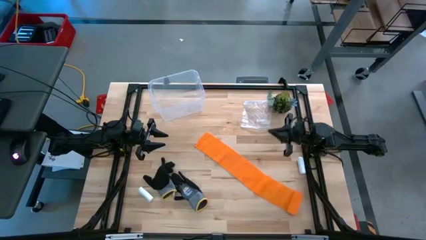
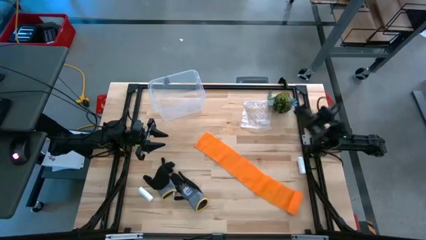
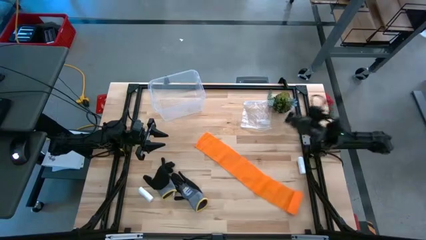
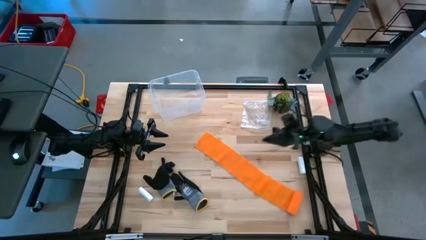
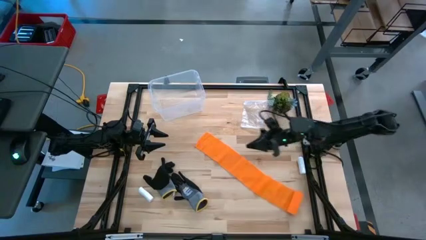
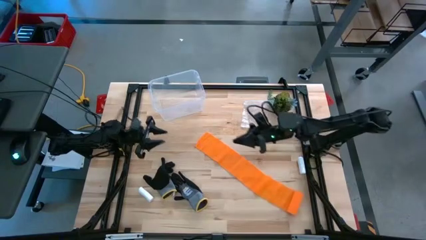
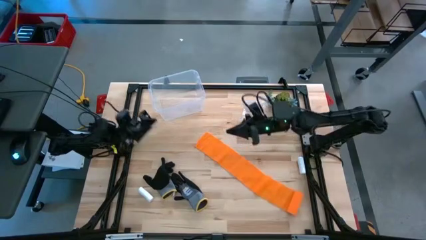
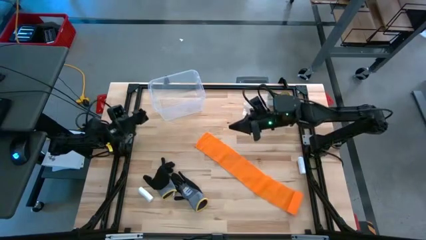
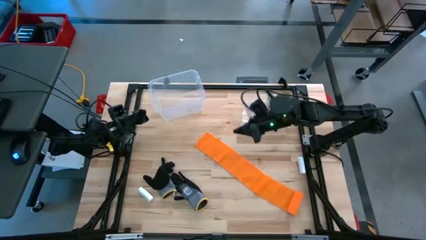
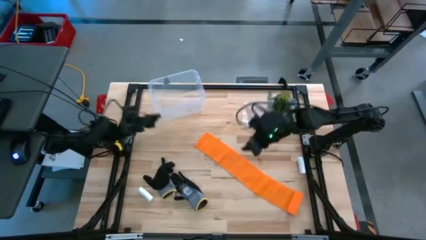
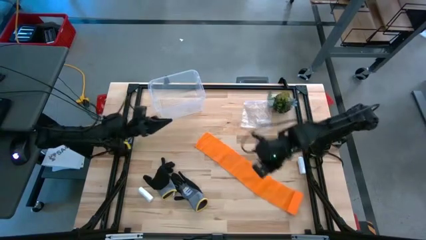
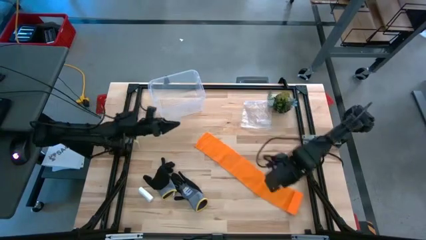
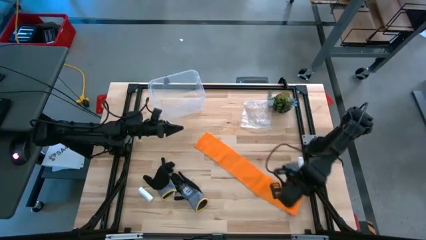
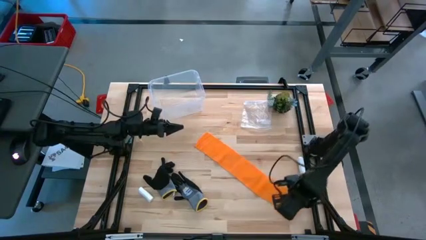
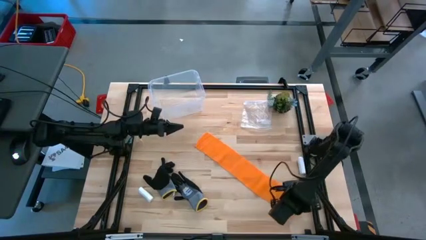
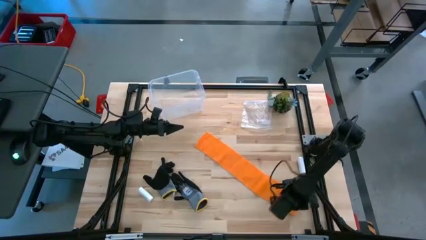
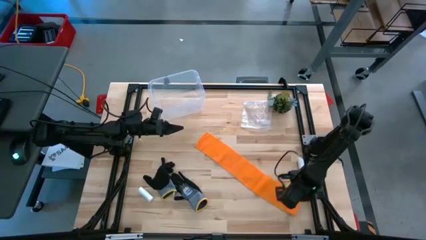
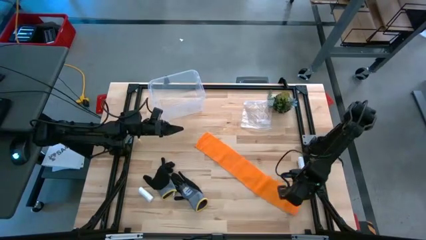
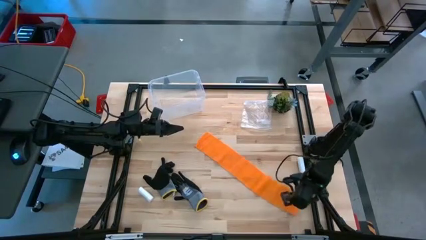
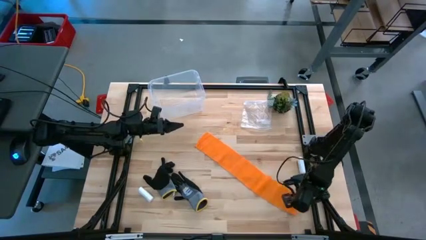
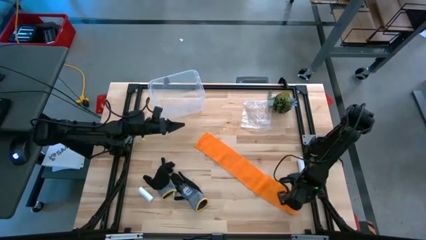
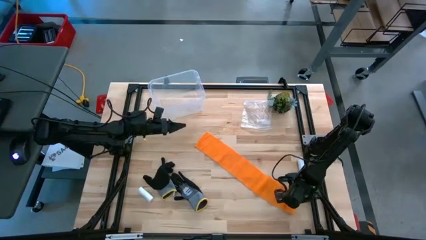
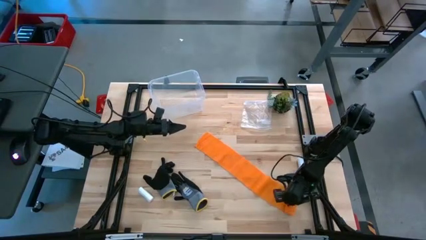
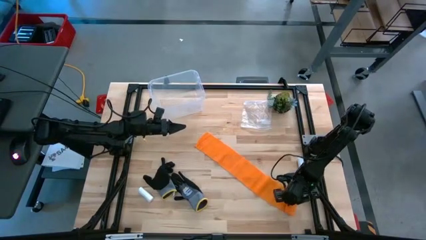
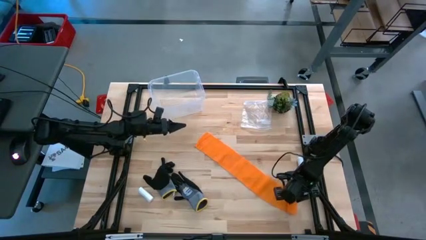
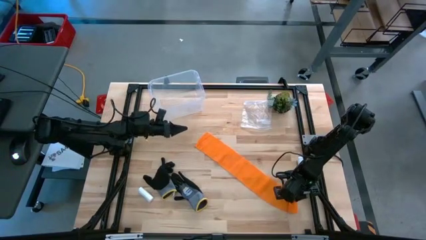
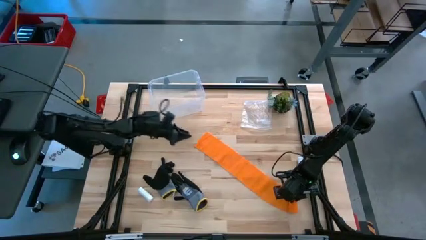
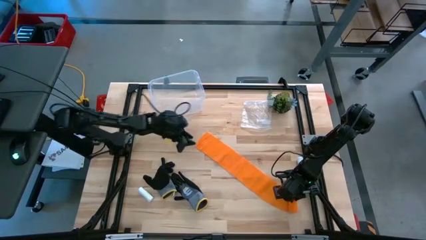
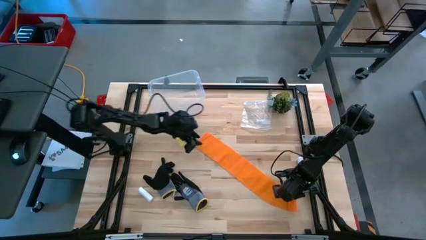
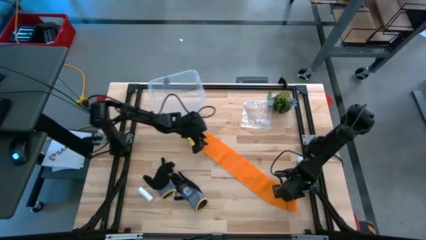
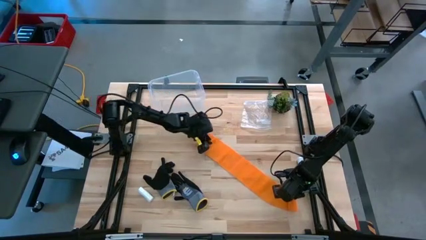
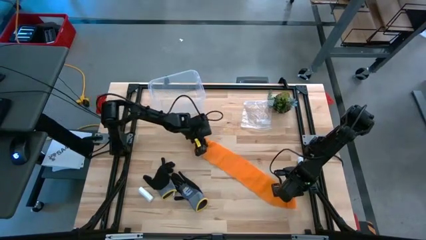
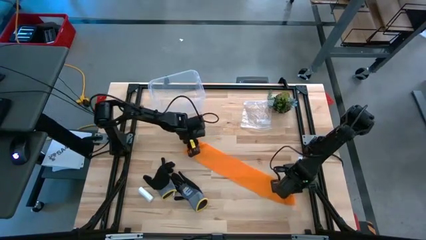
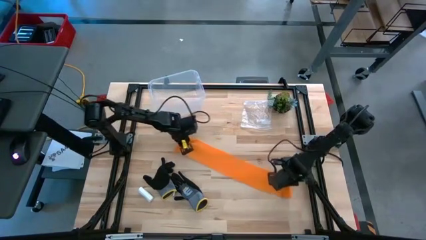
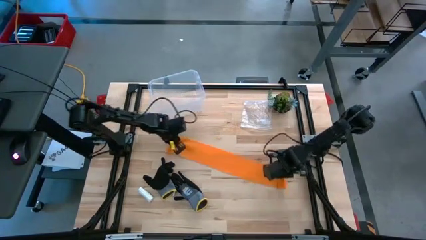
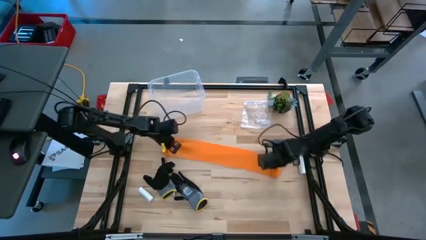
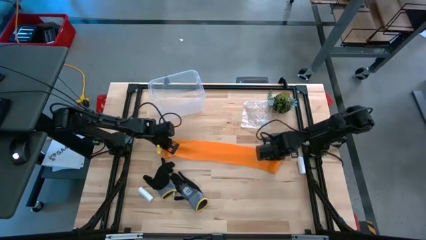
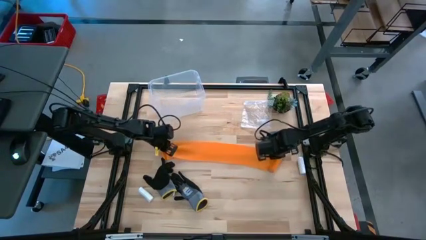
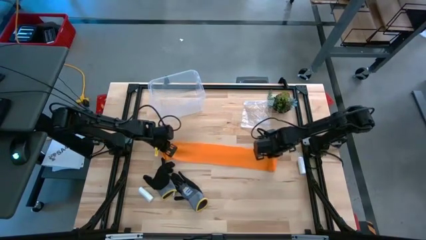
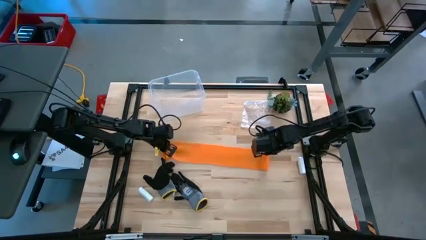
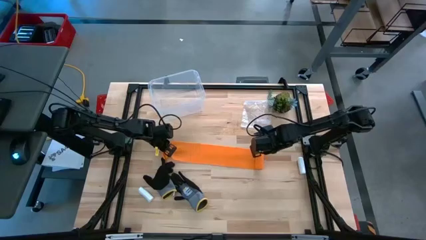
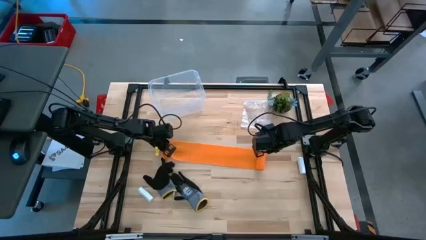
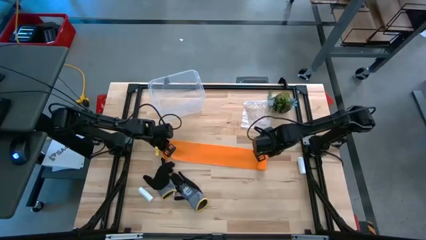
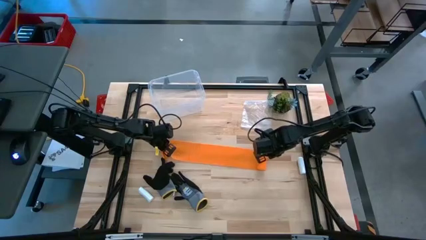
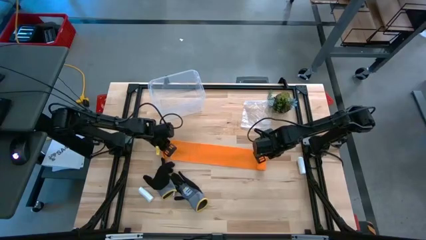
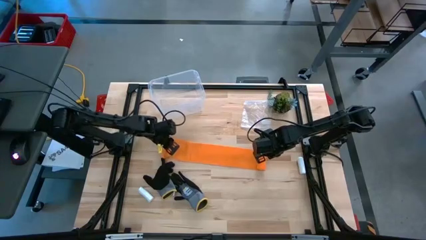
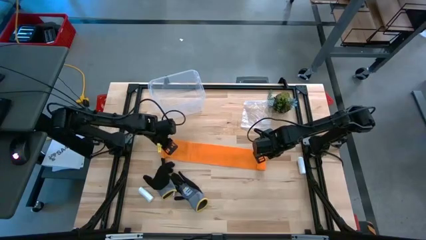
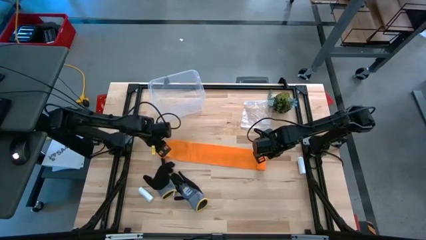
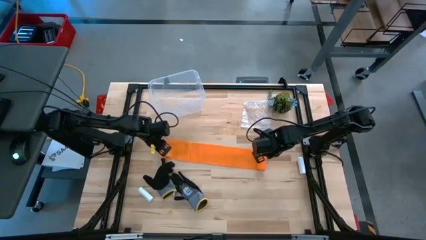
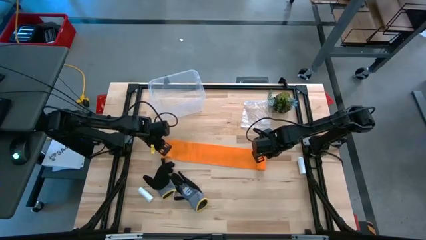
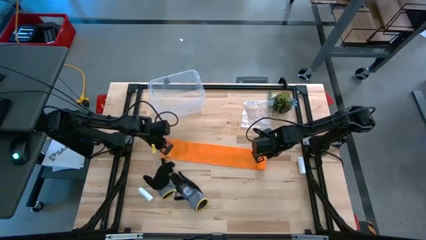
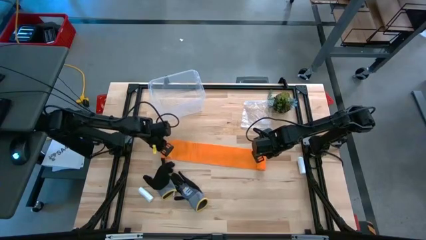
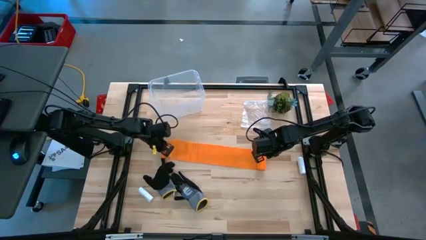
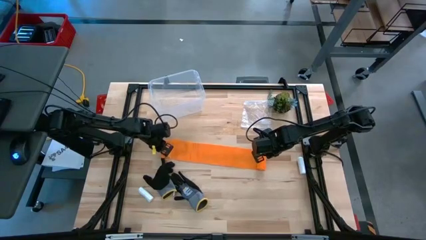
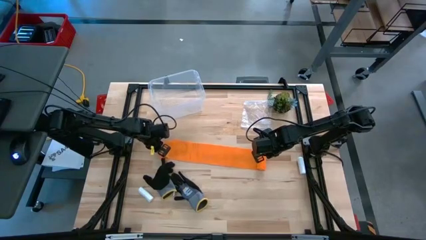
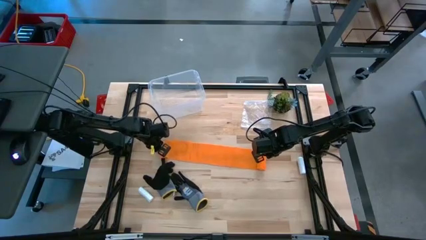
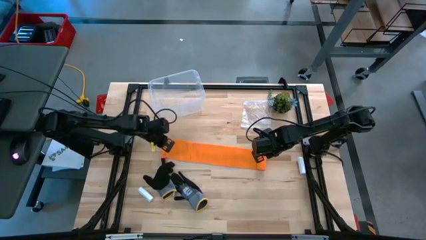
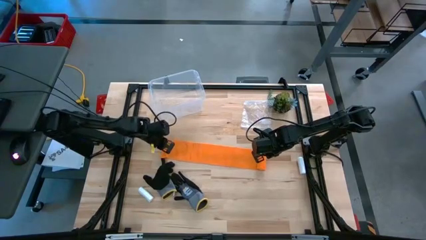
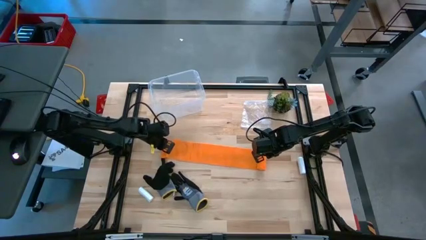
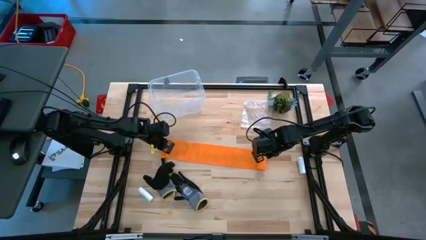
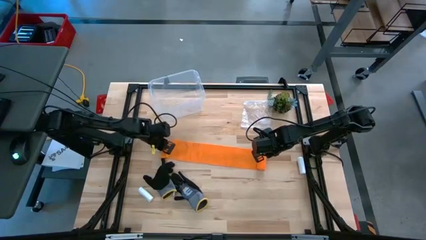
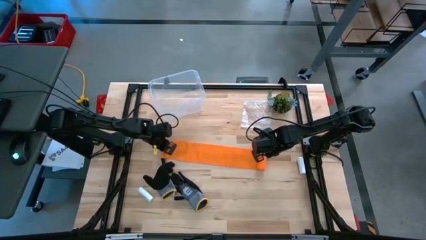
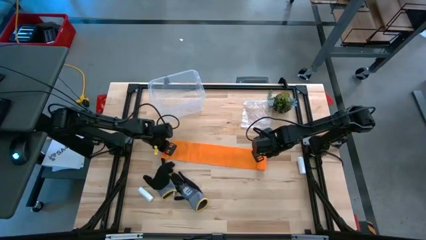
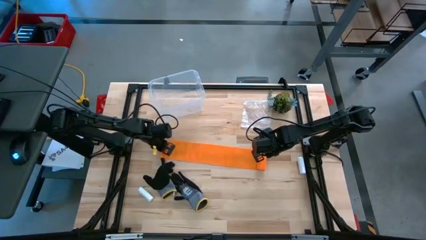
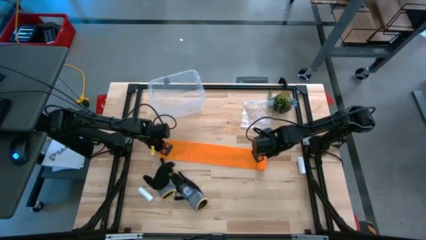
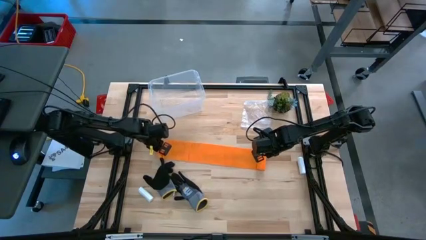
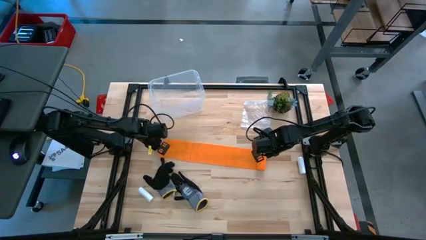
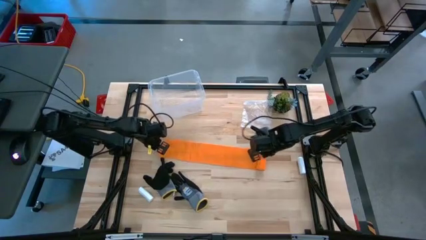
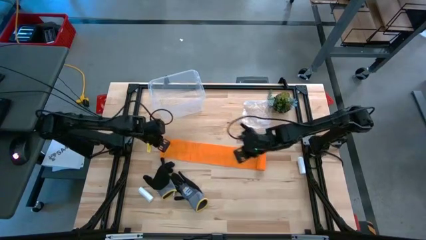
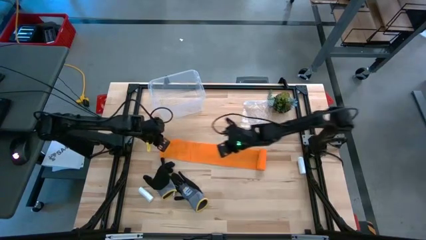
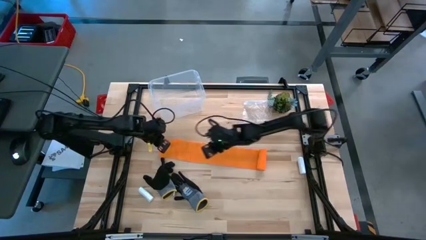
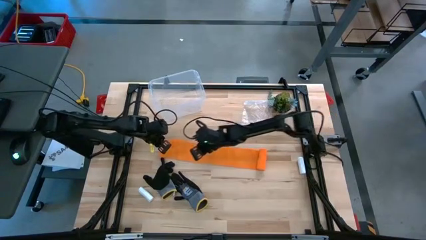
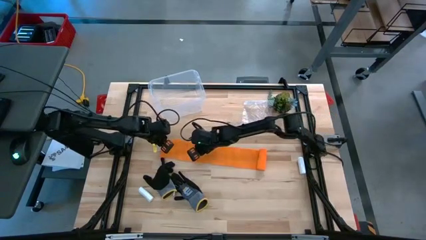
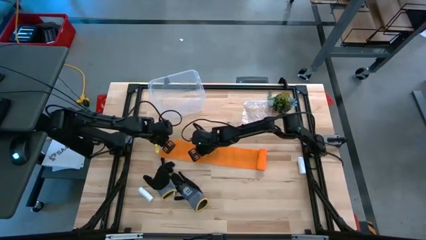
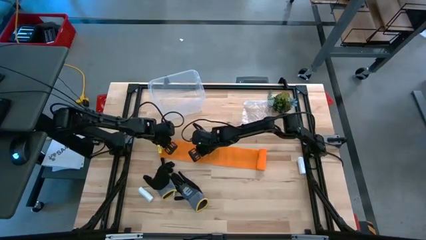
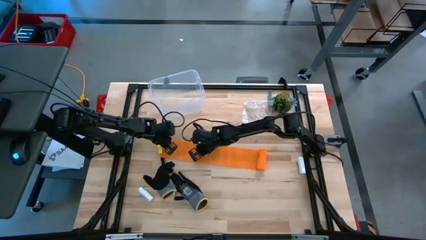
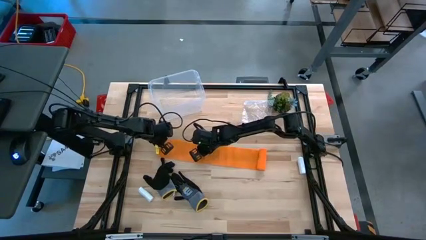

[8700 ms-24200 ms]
Task: Roll bandage
Roll the orange bandage
